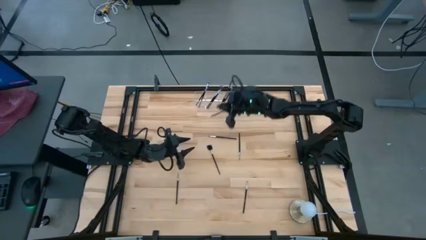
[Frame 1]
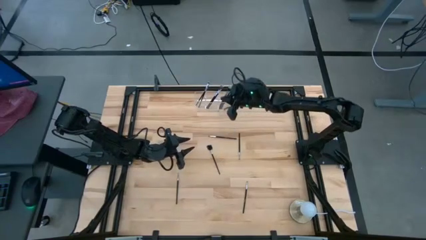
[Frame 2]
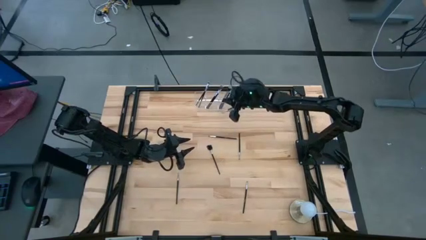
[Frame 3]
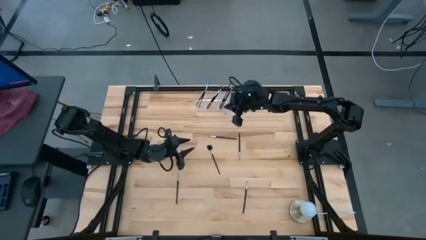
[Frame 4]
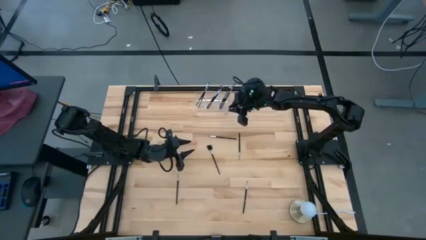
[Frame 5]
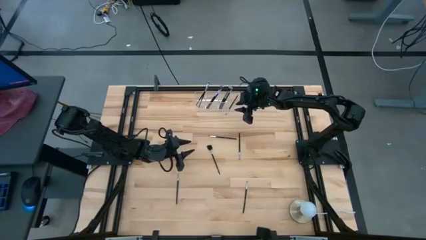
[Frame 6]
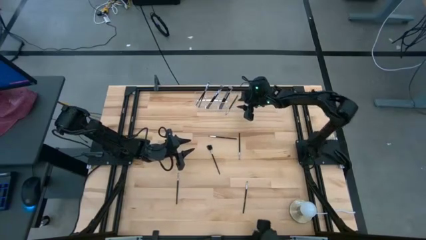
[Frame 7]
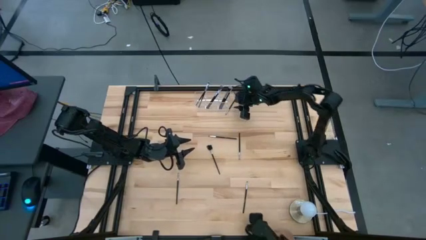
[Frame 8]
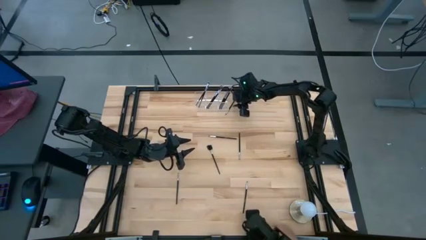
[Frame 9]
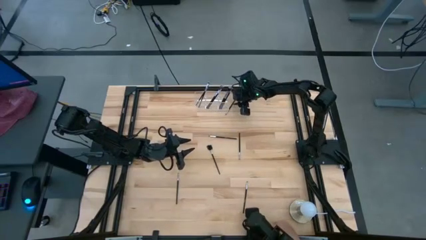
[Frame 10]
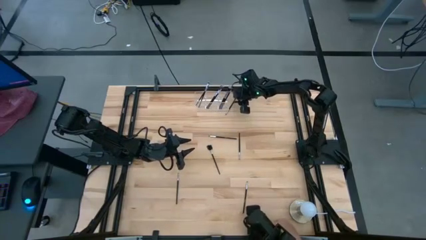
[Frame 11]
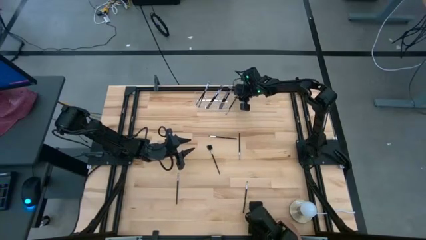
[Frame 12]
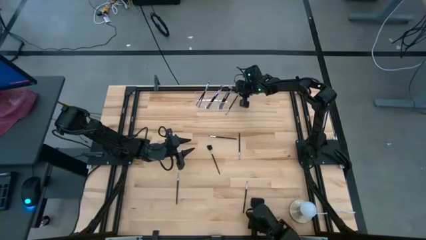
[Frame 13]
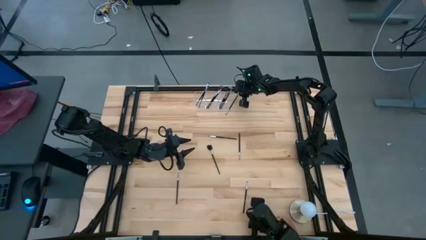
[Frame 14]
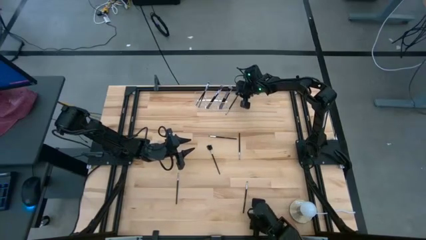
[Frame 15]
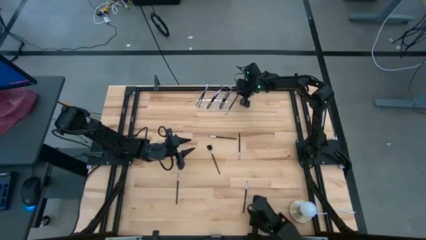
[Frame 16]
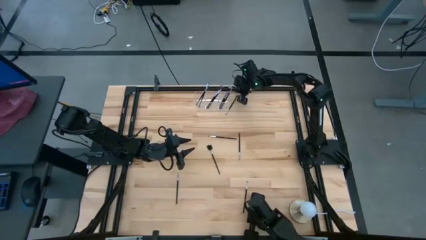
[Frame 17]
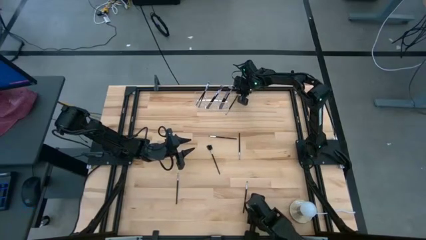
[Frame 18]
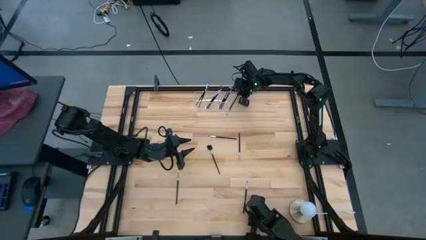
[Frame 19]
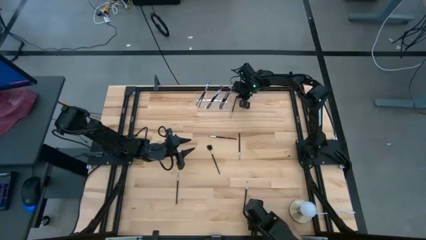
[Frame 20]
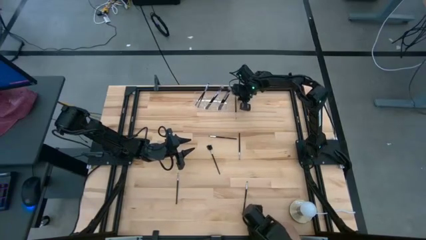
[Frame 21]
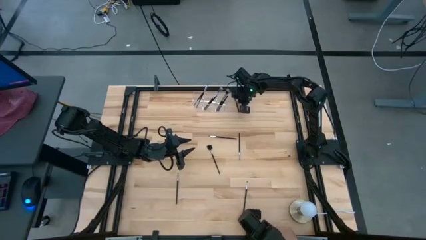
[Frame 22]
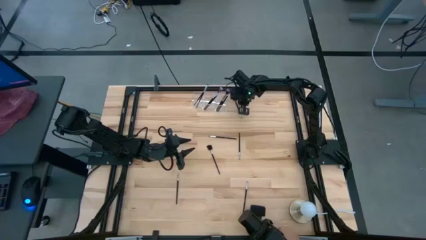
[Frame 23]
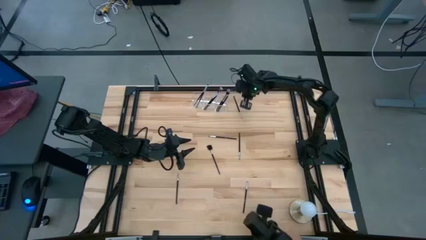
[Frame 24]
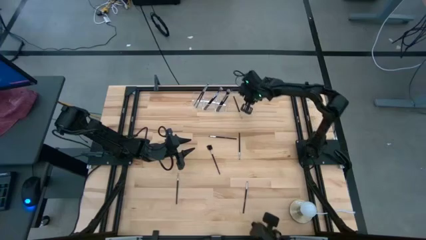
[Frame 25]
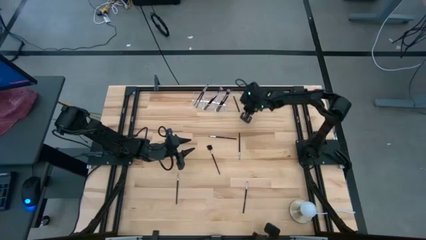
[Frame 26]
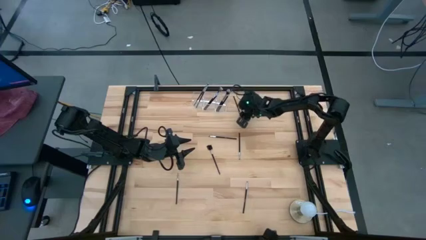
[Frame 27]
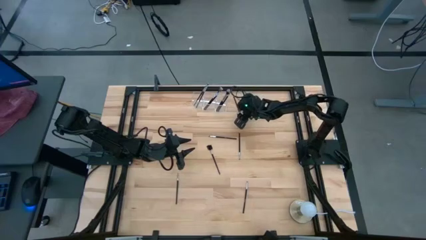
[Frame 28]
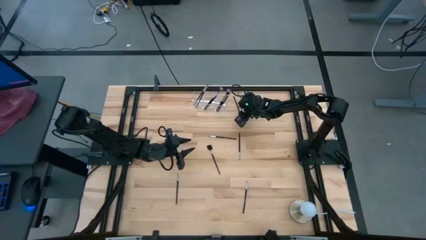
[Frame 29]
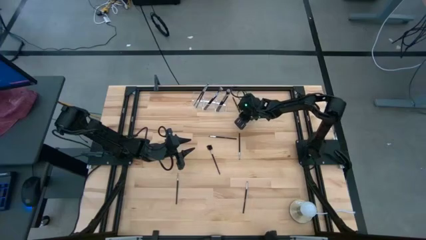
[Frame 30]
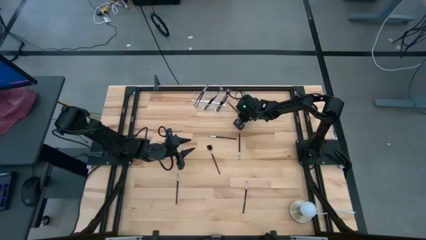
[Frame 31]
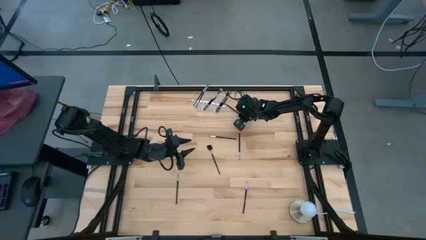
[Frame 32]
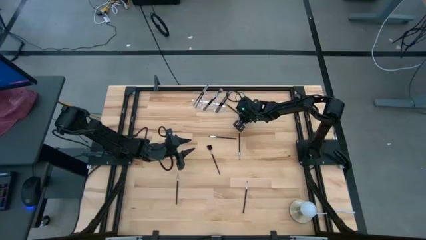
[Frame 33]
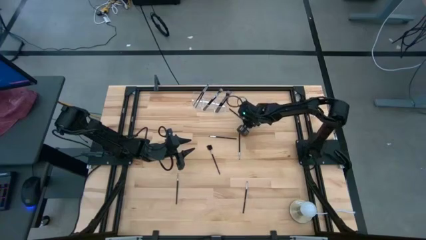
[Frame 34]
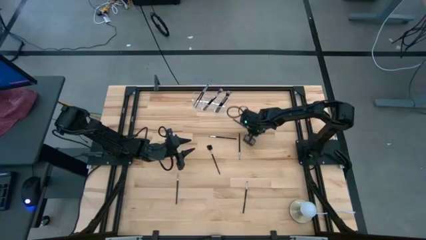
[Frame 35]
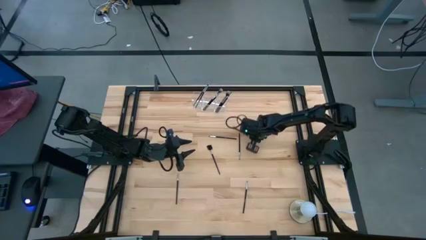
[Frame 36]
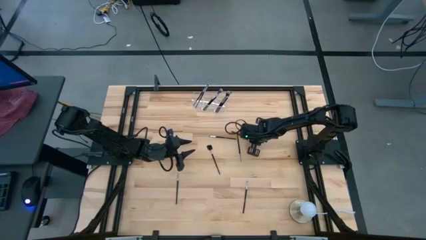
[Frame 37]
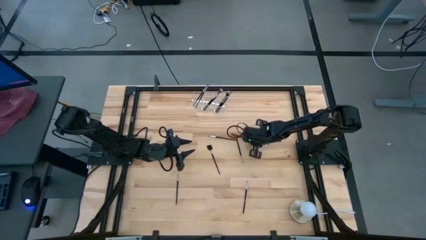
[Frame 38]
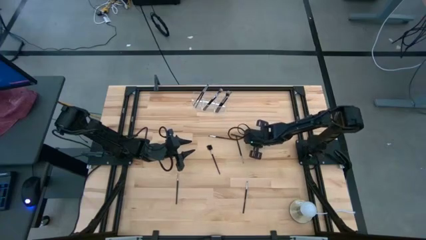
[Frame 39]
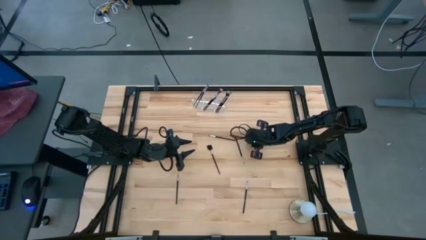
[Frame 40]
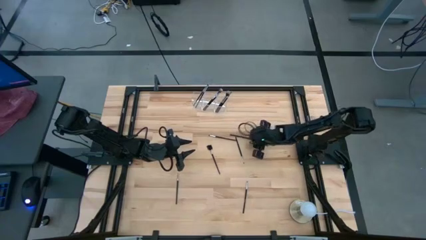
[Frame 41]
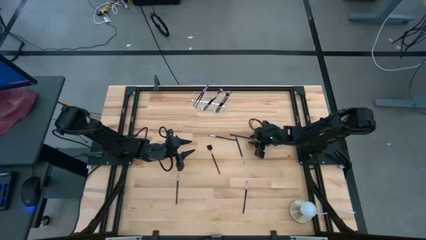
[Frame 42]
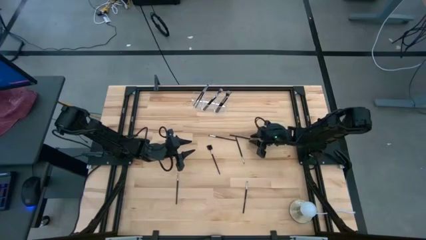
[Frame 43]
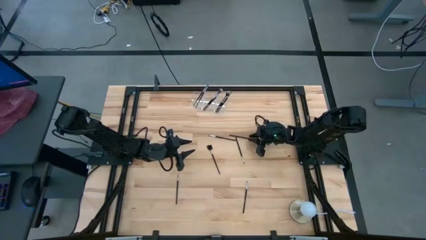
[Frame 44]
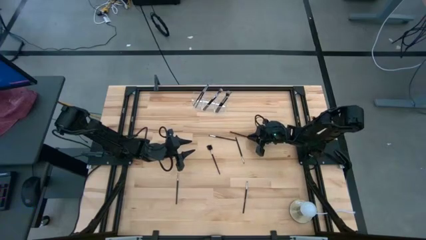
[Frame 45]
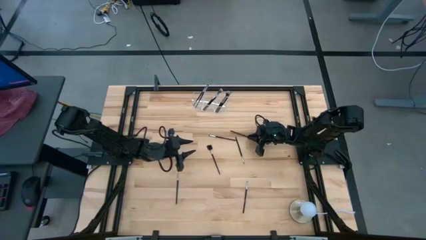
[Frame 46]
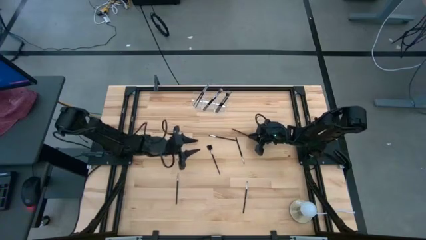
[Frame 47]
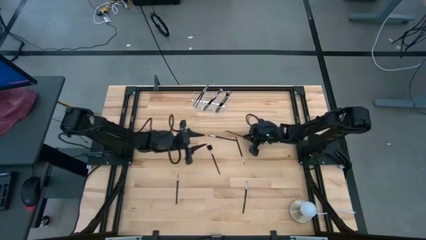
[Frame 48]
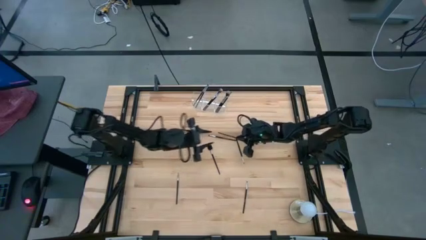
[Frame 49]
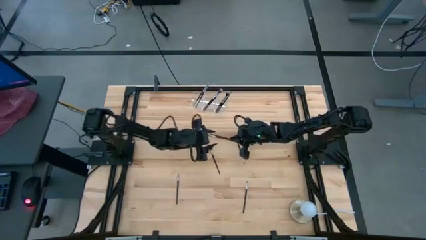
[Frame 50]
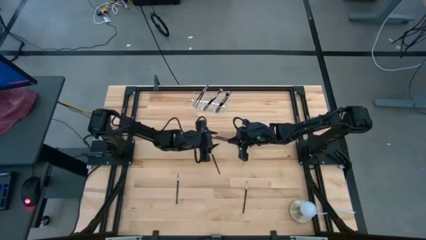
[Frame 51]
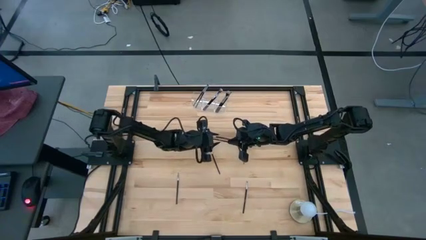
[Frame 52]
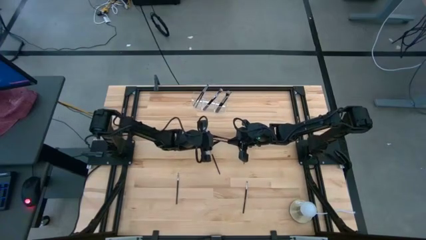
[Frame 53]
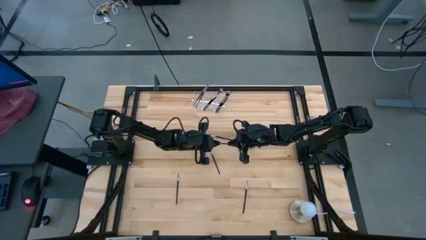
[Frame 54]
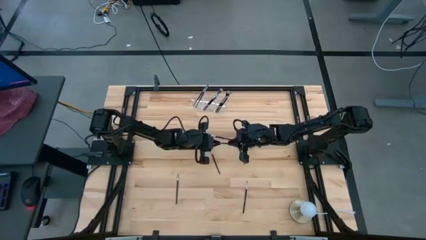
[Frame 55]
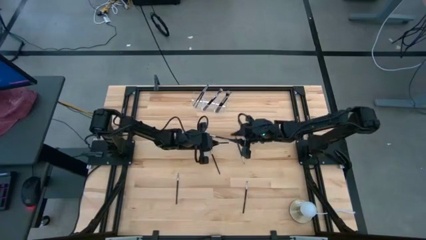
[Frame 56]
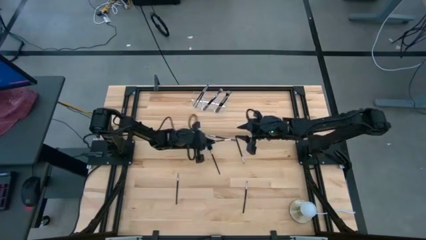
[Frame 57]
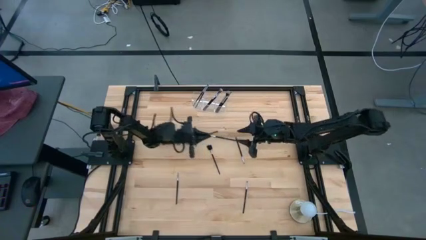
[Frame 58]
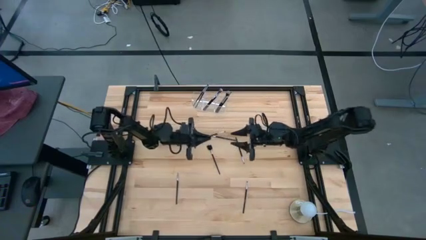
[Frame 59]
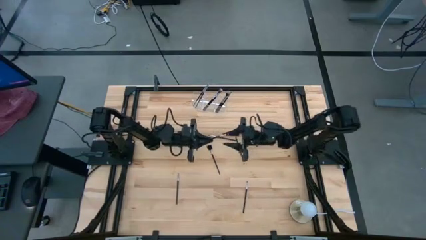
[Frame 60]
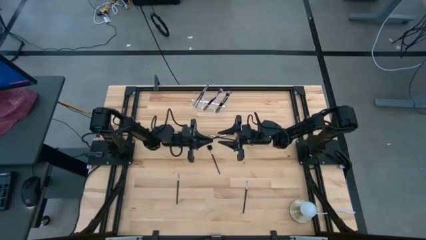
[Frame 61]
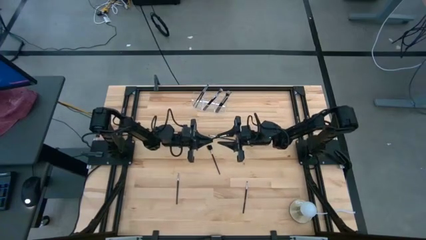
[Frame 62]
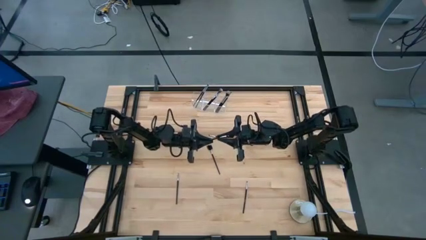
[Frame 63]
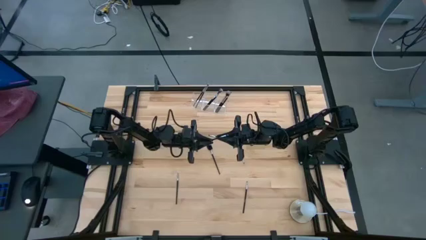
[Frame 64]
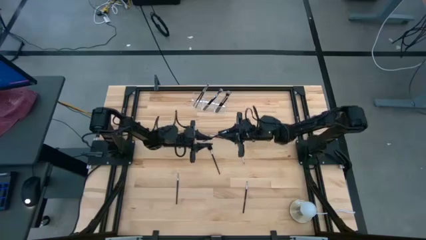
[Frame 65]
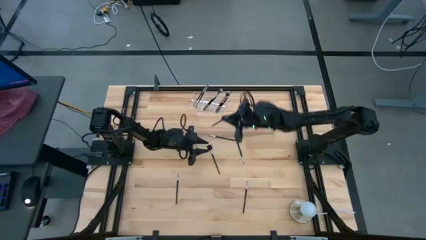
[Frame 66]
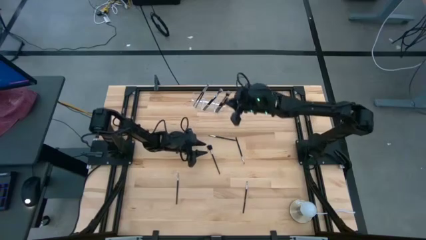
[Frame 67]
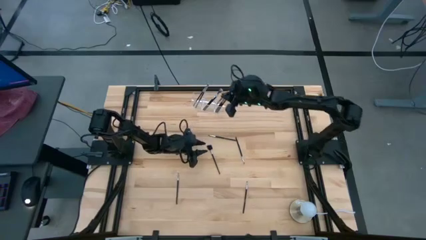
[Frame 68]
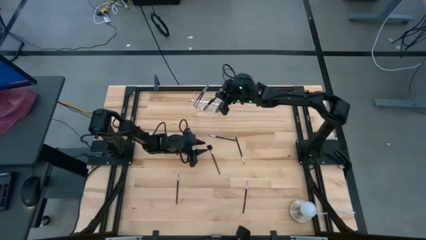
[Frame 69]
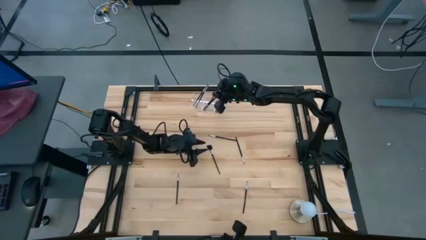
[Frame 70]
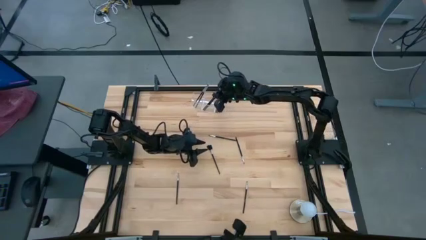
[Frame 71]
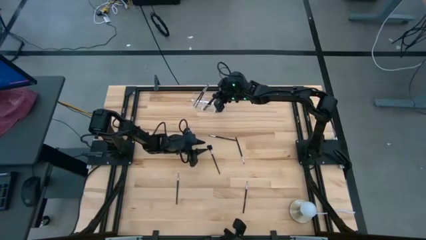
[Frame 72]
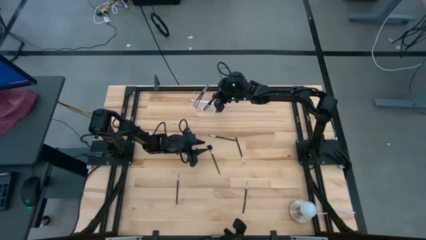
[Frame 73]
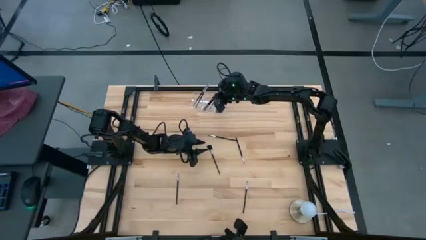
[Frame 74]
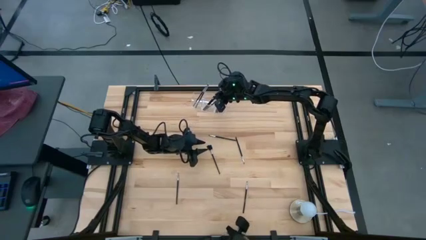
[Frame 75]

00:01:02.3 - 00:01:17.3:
Task: Put items in baskets/containers
Put the black eyeshadow brush into the transparent organizer

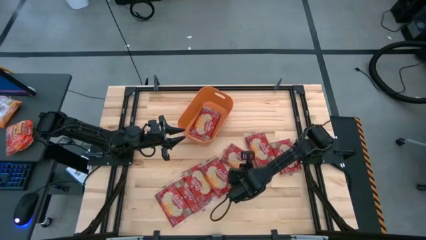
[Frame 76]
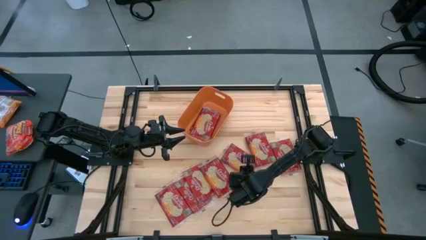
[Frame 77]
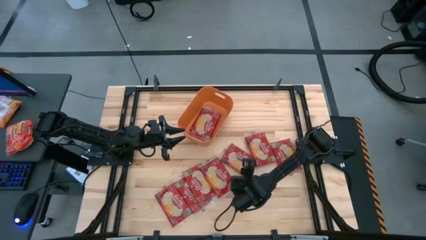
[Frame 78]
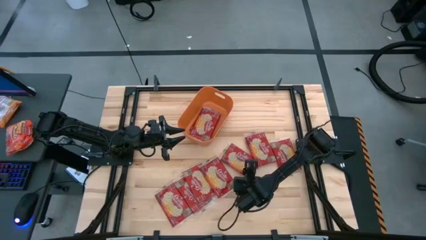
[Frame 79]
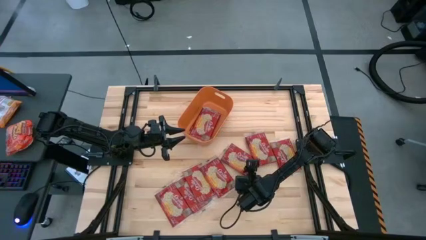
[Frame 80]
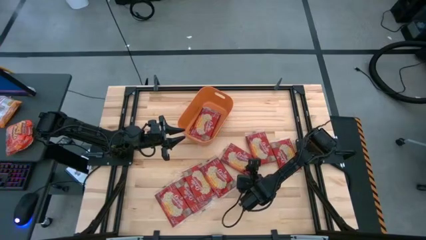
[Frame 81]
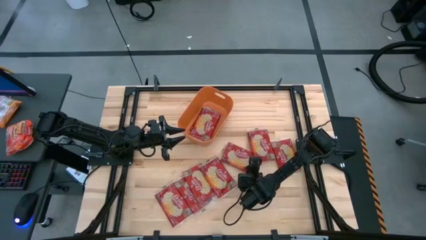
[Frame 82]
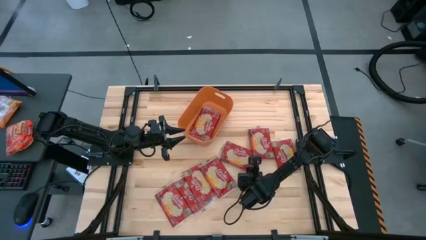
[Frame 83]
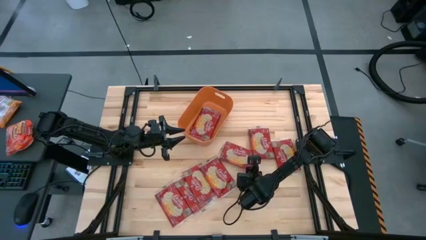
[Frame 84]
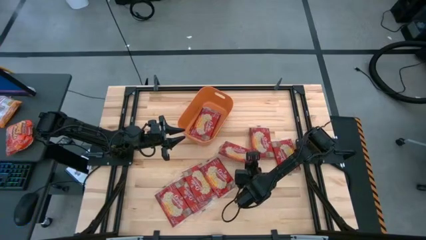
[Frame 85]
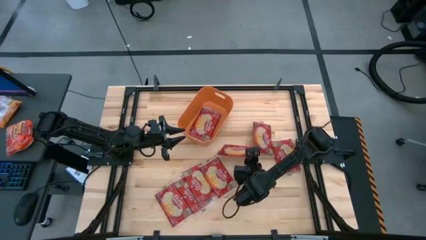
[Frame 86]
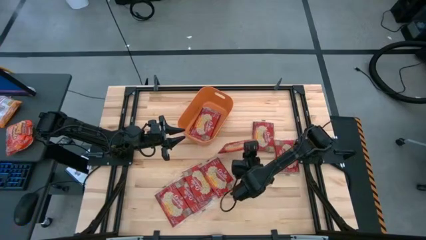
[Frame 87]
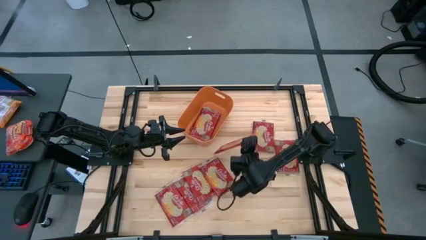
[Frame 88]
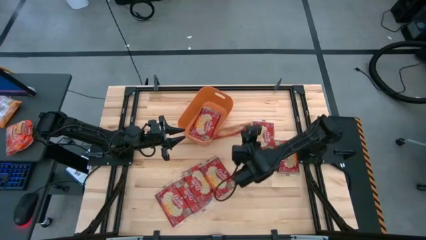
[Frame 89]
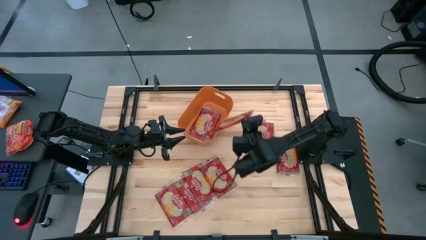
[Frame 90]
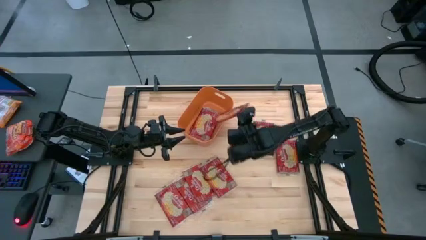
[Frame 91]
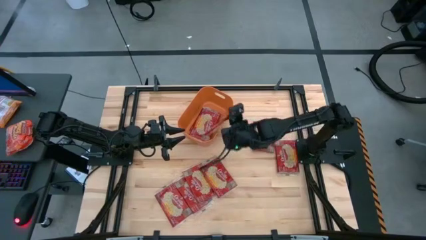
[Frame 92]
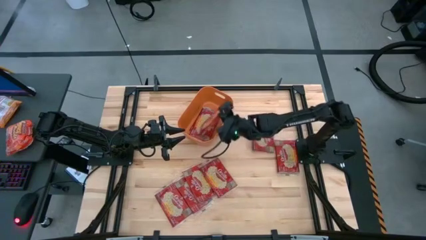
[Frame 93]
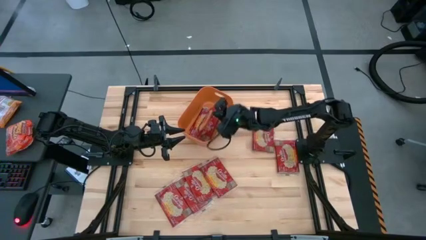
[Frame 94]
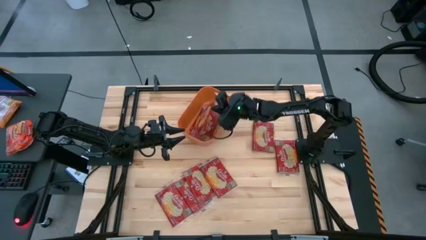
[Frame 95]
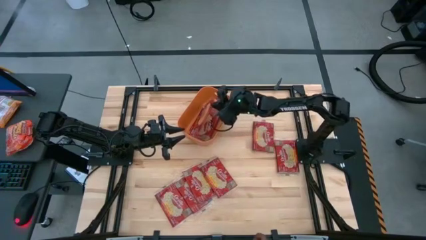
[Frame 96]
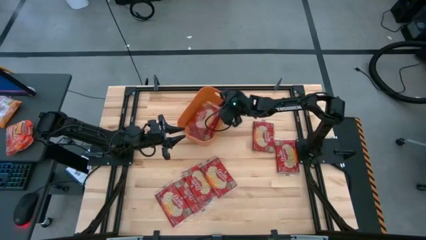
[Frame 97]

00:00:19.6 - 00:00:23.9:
Task: Sort popcorn bags into baskets
Put the red popcorn bag into the orange bin
